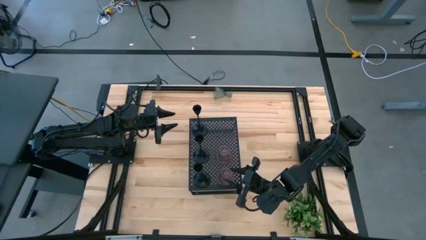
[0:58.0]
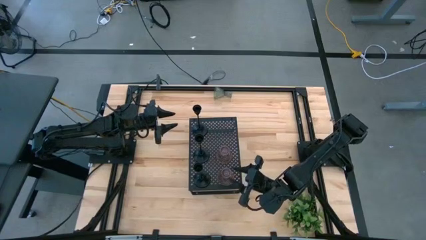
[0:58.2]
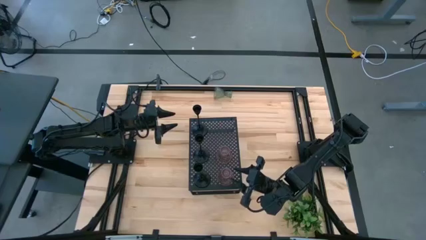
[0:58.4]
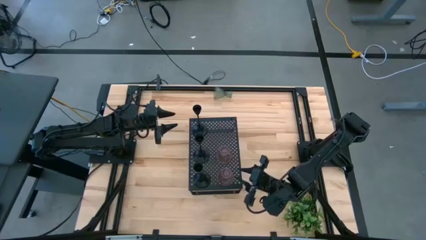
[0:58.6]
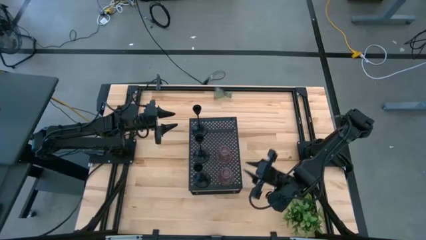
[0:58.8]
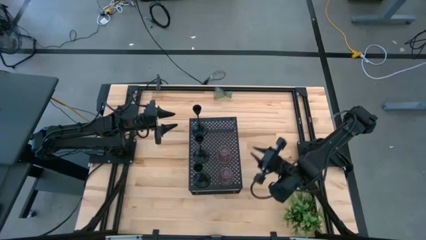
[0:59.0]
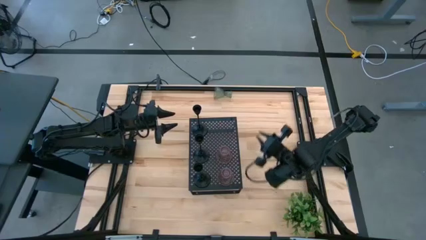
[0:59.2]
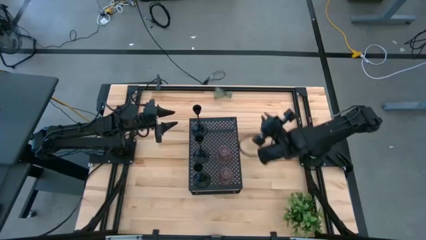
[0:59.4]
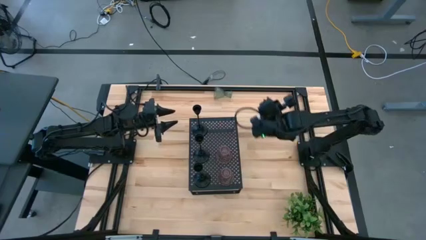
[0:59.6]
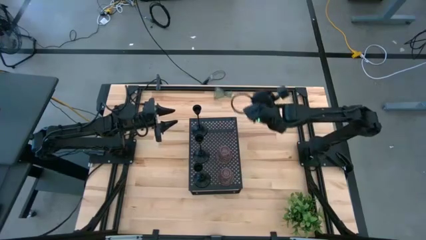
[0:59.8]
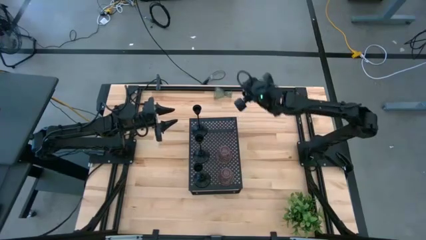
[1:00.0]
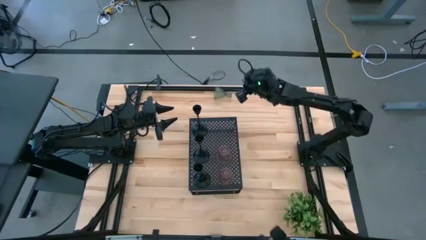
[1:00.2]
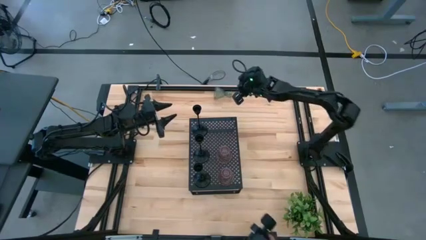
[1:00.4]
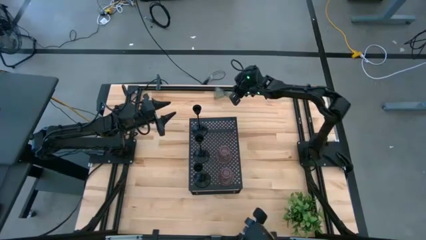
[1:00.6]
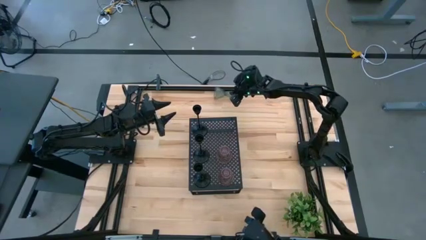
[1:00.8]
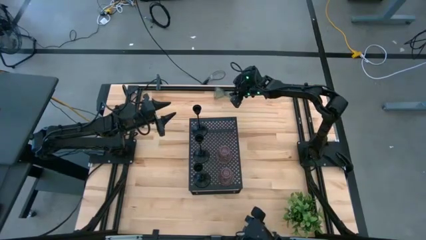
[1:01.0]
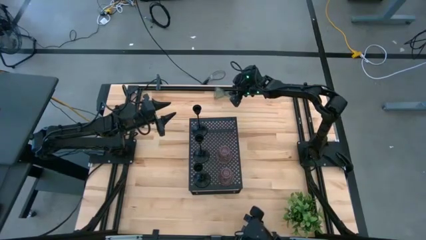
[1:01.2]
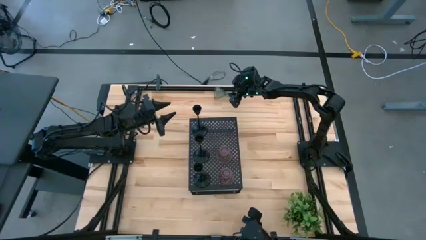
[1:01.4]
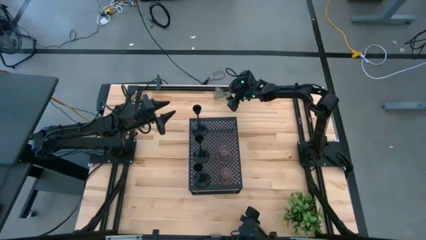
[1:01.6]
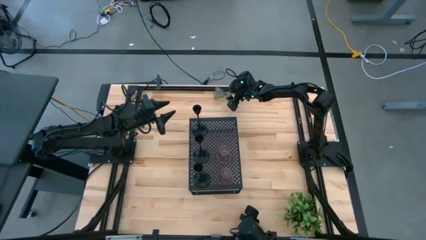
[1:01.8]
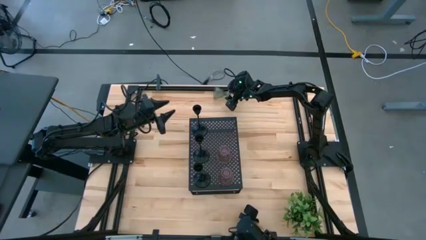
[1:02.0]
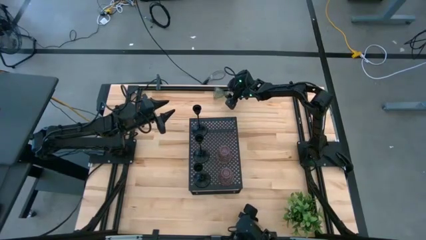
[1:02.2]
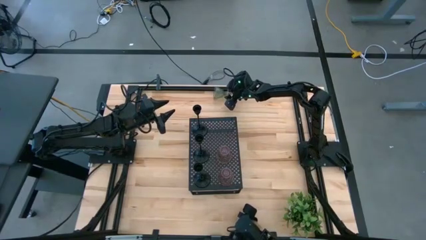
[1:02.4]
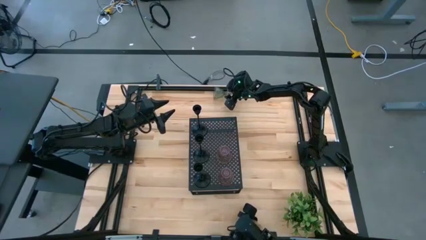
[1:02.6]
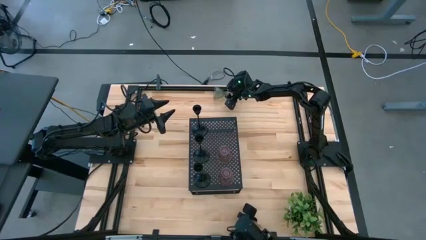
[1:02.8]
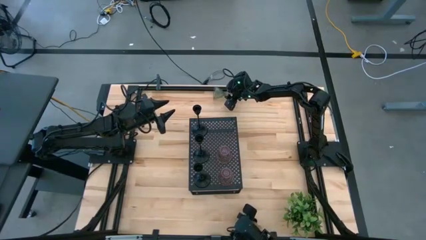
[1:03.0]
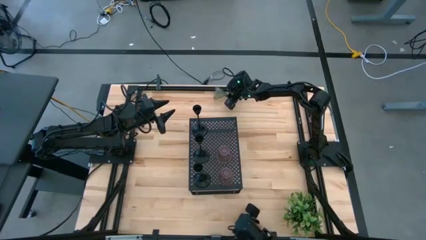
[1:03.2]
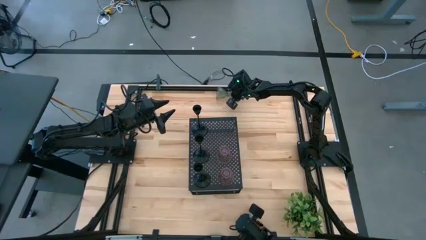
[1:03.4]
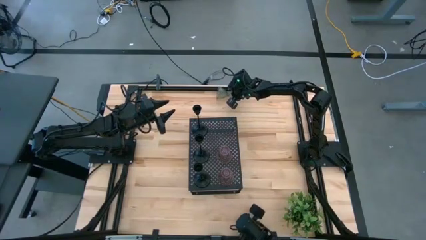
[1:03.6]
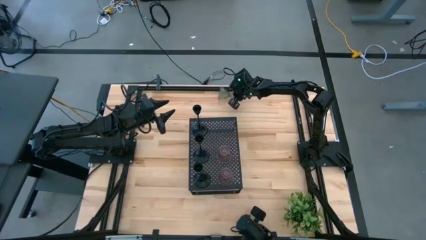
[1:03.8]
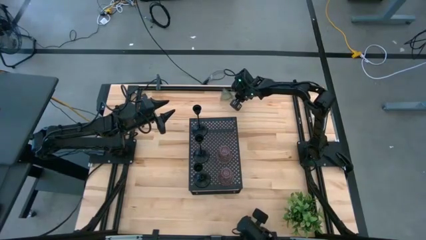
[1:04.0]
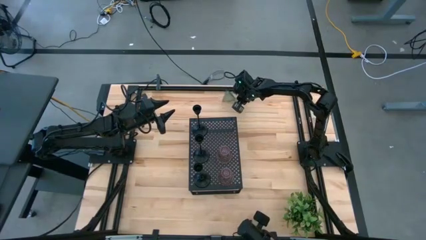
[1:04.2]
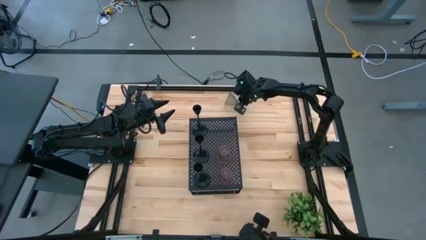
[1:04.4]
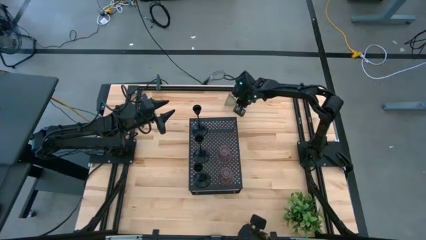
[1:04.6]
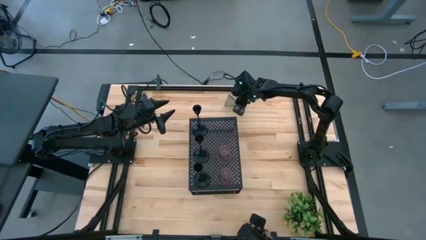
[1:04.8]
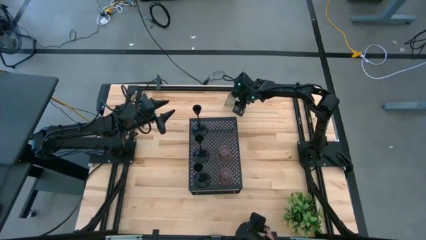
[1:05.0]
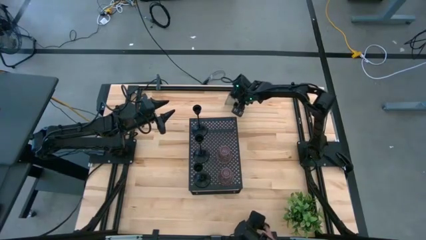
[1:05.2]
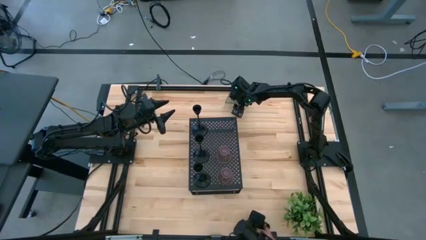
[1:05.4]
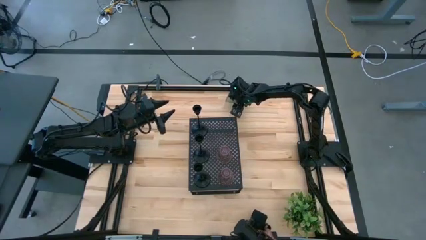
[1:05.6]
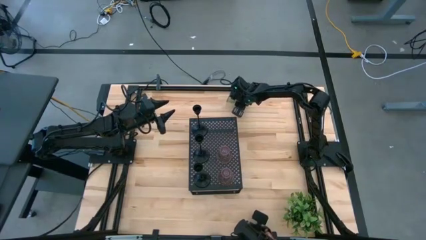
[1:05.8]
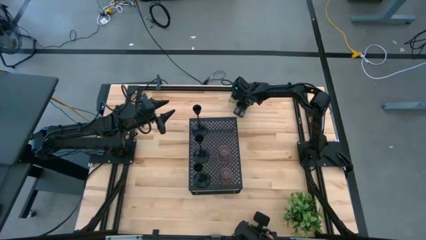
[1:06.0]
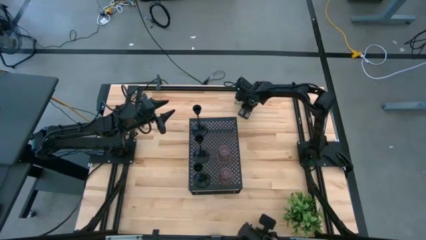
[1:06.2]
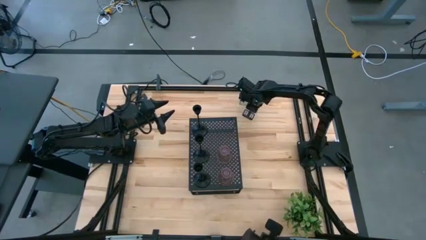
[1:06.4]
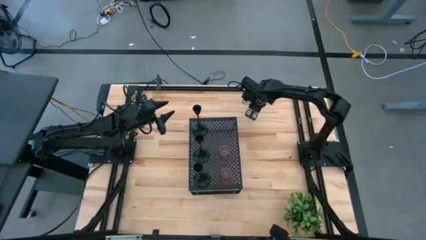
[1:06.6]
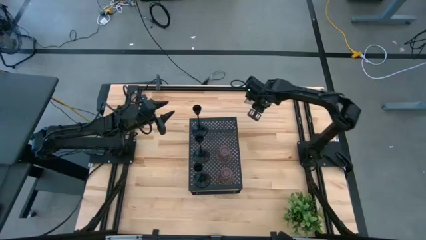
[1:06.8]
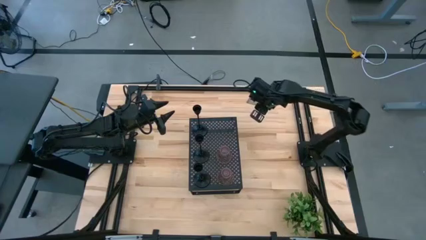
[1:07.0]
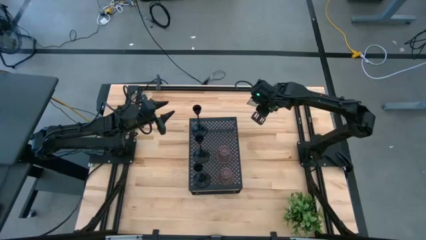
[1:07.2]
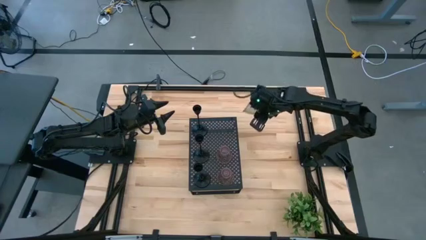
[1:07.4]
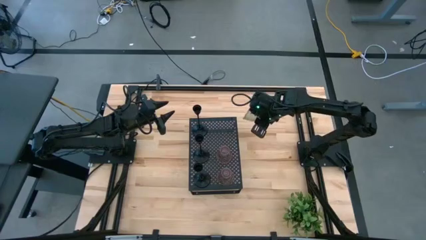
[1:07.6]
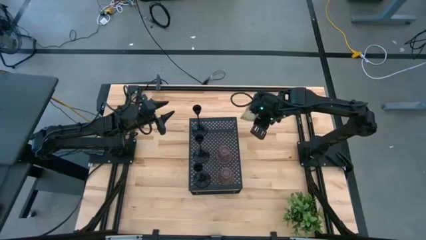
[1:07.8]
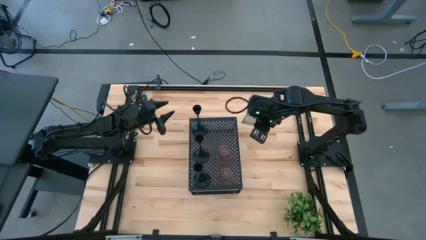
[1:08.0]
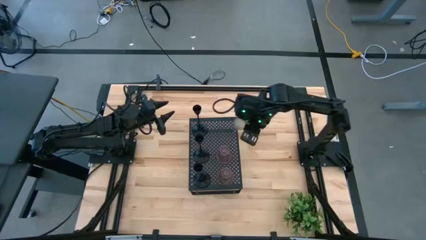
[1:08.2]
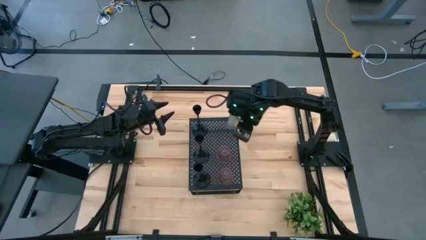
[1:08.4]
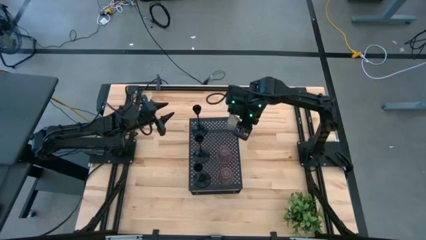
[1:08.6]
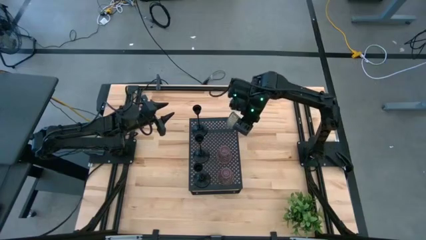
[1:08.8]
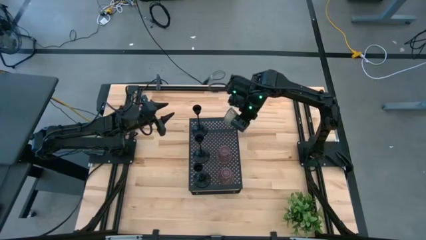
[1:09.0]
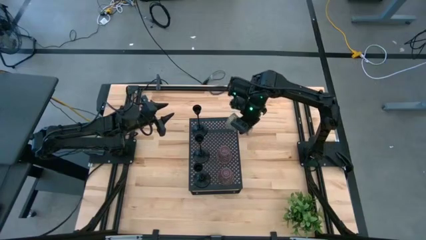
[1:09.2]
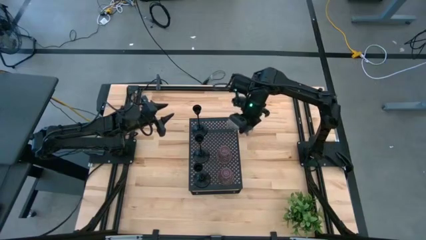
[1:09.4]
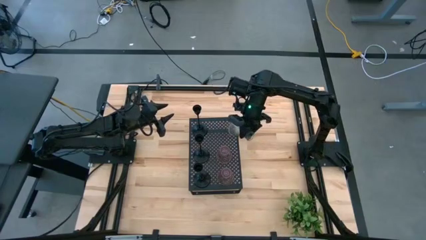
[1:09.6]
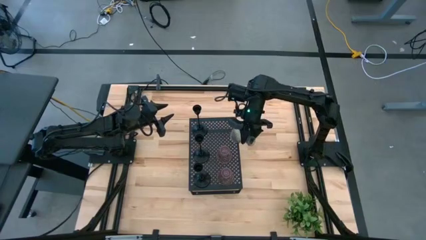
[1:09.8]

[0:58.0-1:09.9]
Task: Pick & Place candle stick holders
Put the green glass candle holder on the shelf

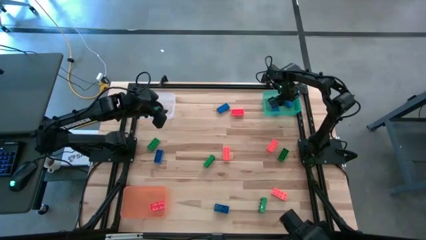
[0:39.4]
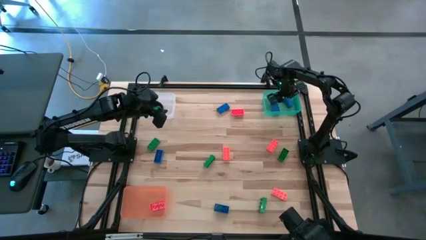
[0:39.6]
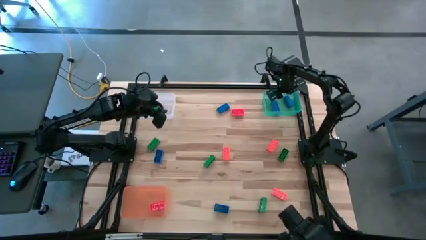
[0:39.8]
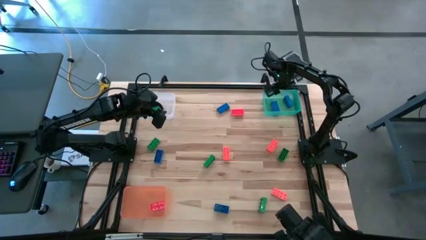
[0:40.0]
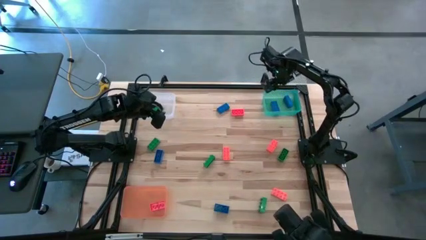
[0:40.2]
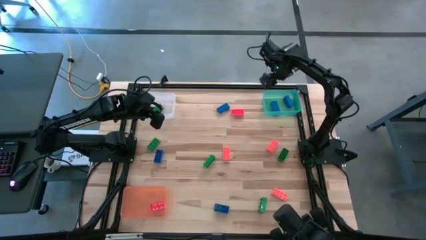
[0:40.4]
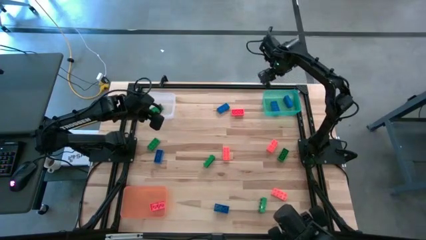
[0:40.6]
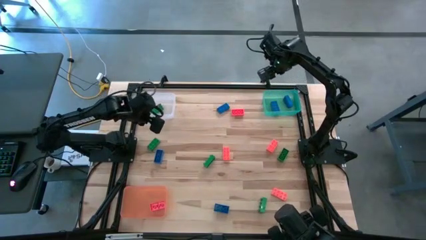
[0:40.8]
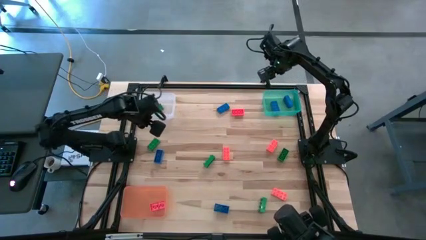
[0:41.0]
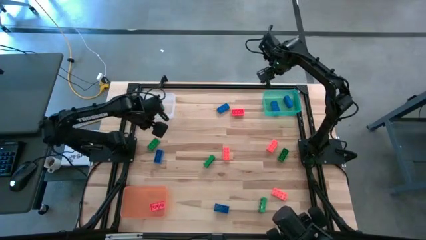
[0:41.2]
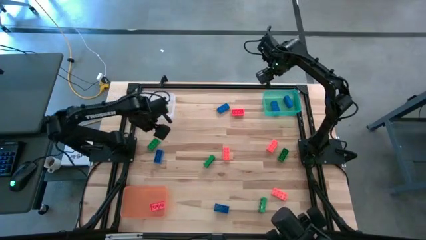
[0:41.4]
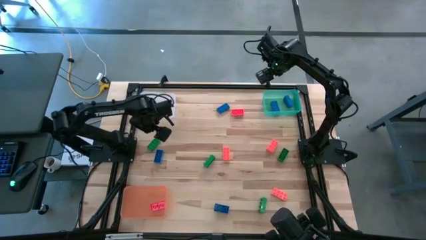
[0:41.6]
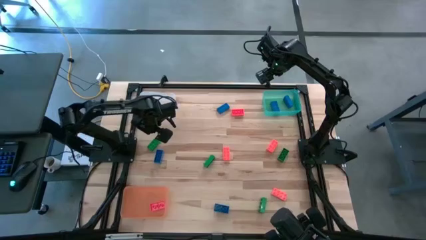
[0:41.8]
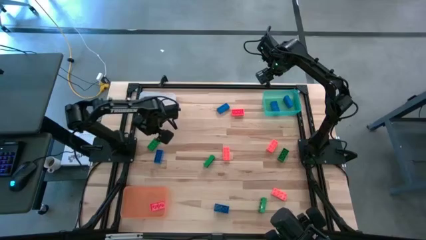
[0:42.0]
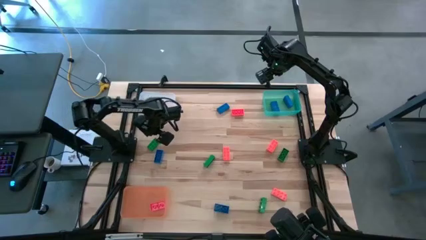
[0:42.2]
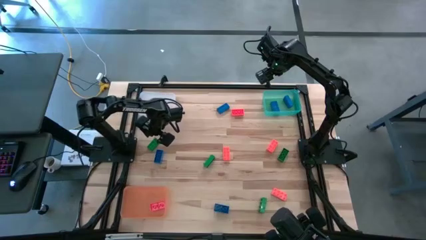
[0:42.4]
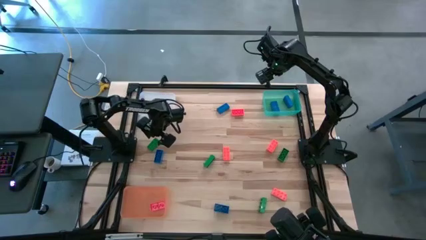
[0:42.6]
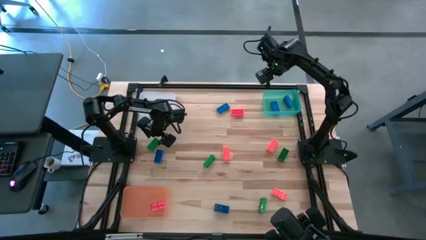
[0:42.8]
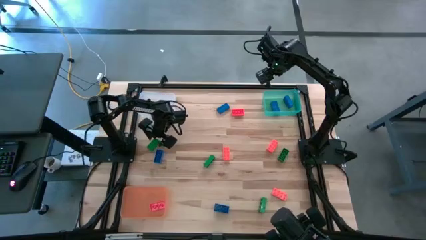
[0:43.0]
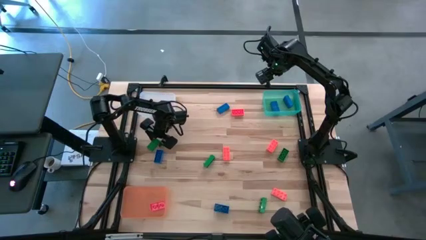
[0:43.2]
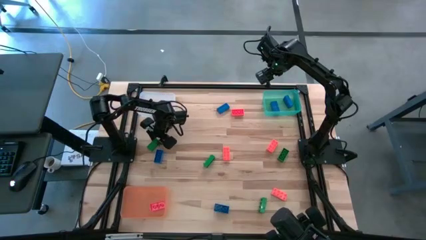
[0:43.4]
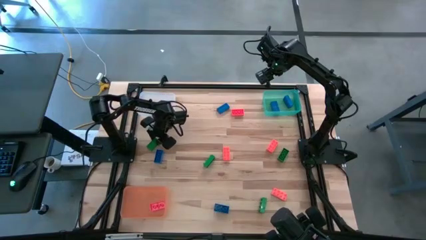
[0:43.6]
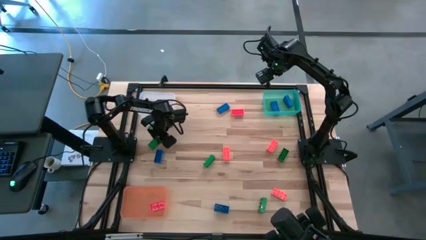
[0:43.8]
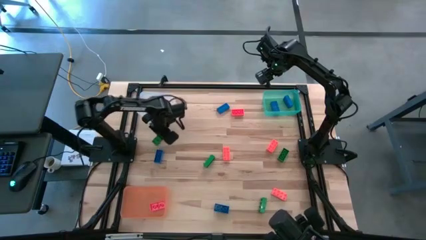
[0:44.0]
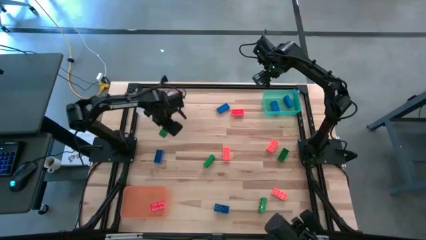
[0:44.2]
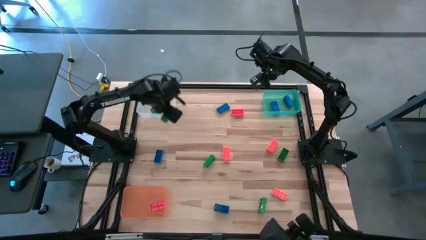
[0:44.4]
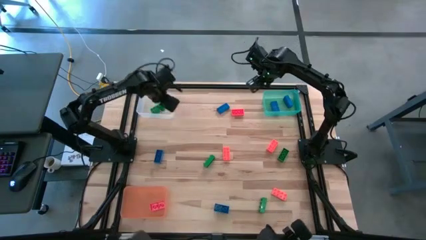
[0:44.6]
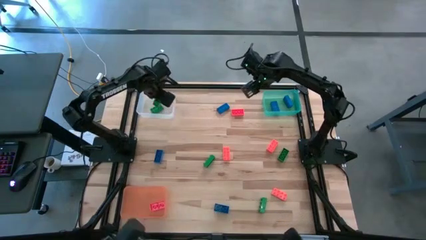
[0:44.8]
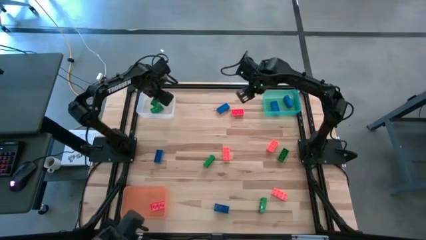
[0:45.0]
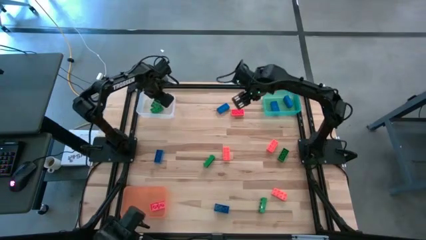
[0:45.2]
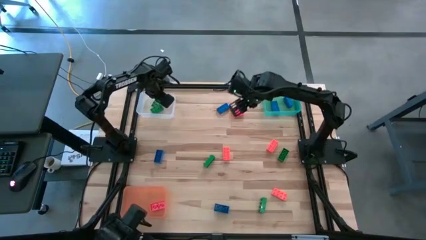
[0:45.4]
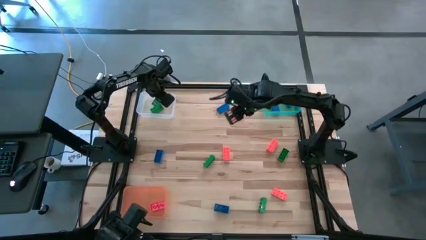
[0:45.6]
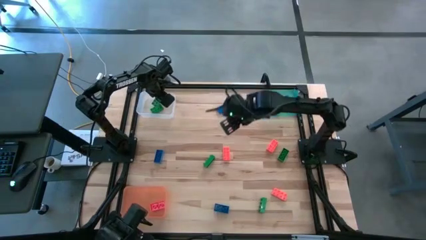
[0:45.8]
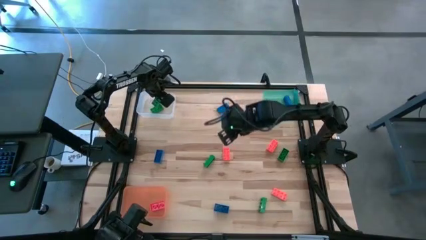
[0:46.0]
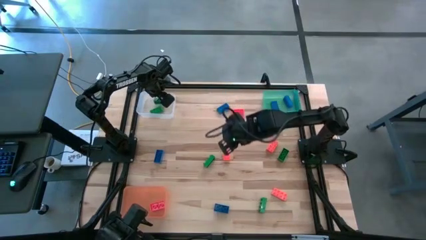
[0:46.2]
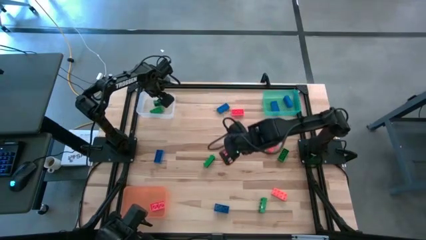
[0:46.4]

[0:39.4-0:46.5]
Task: Sort & place blocks by color
Put the green game piece into the white bin
